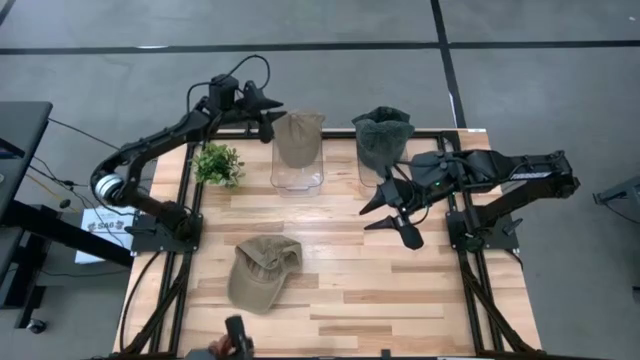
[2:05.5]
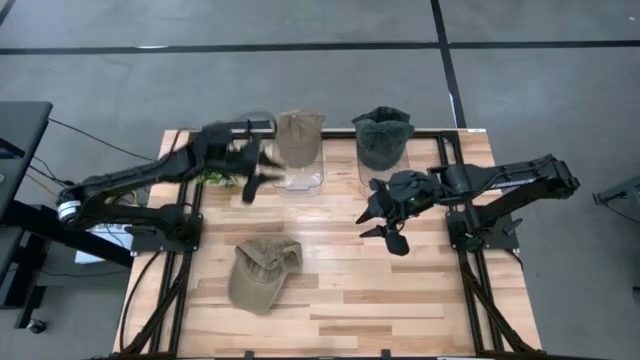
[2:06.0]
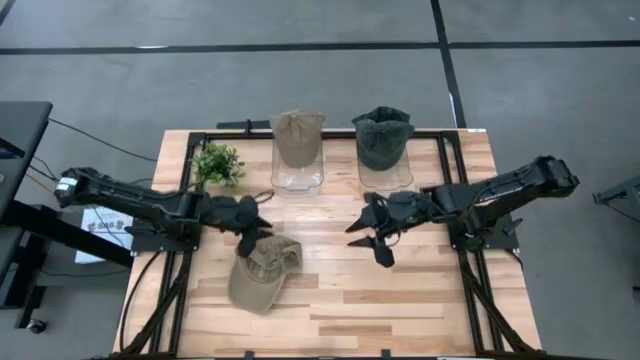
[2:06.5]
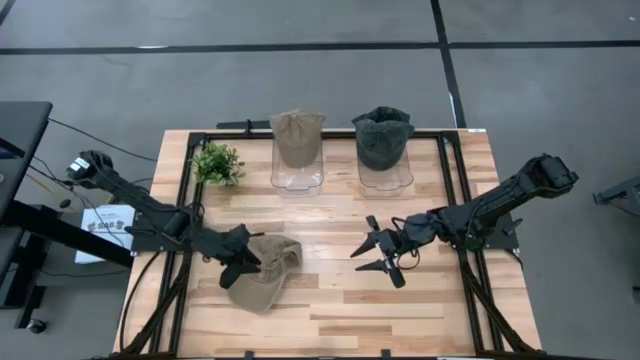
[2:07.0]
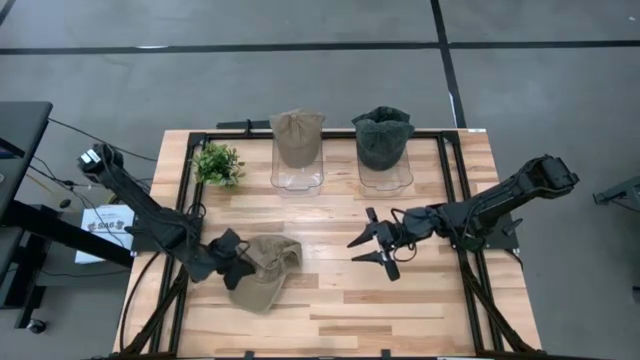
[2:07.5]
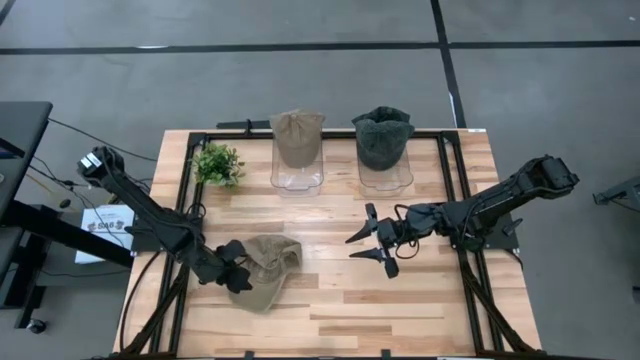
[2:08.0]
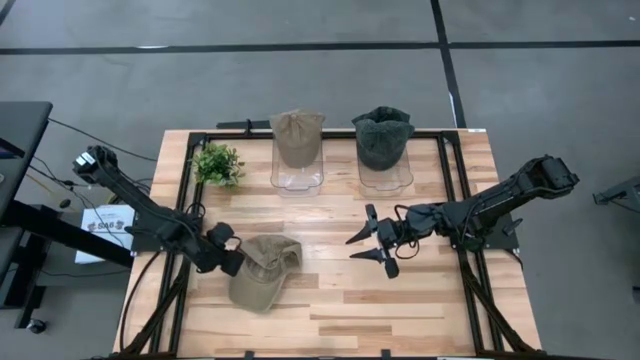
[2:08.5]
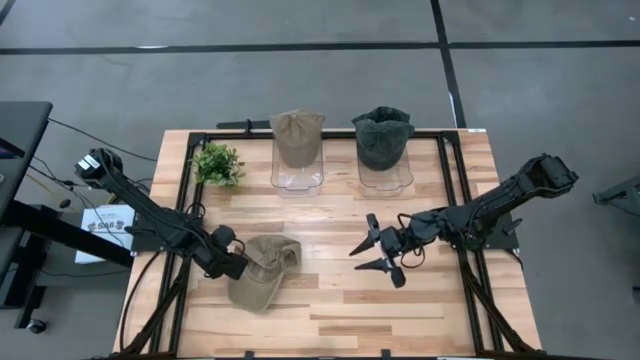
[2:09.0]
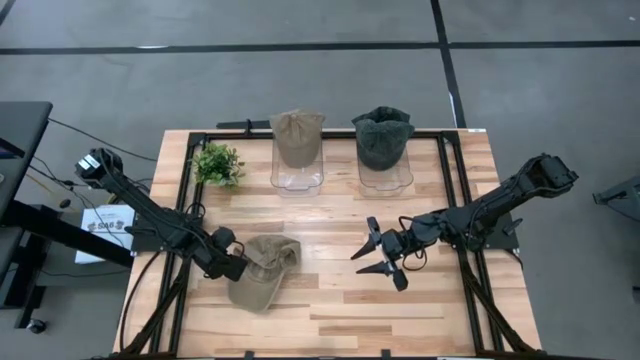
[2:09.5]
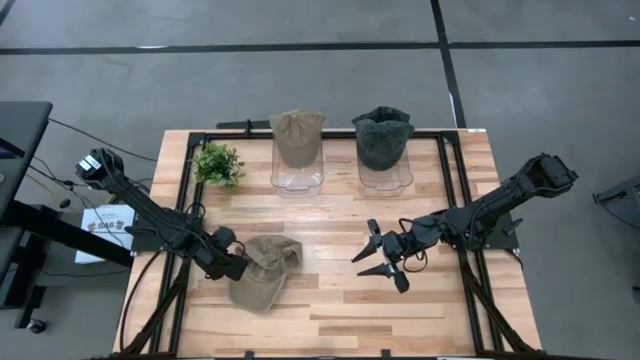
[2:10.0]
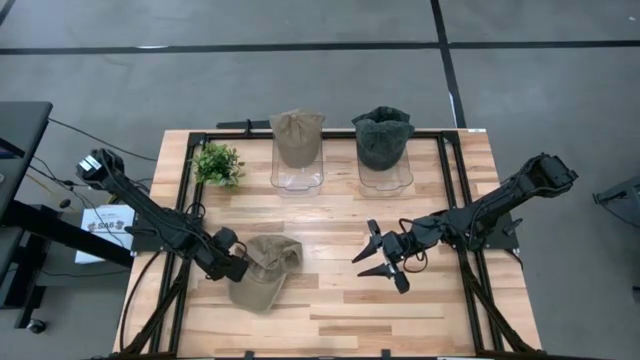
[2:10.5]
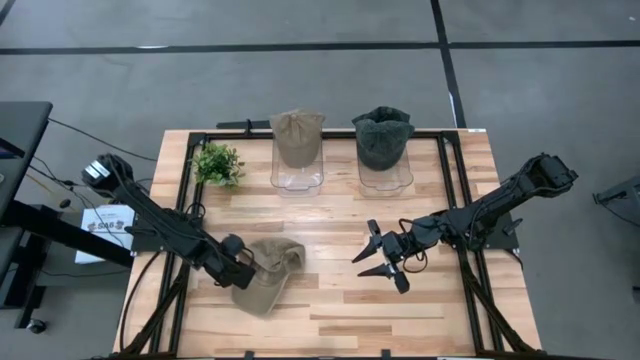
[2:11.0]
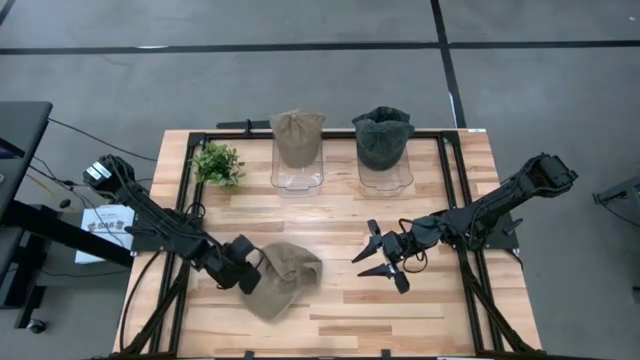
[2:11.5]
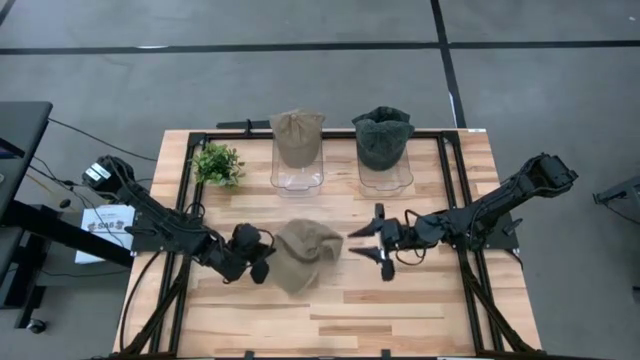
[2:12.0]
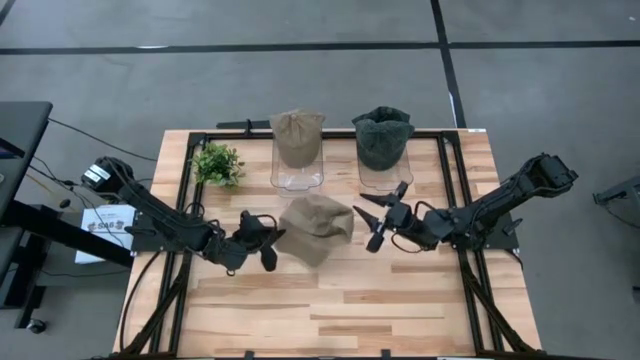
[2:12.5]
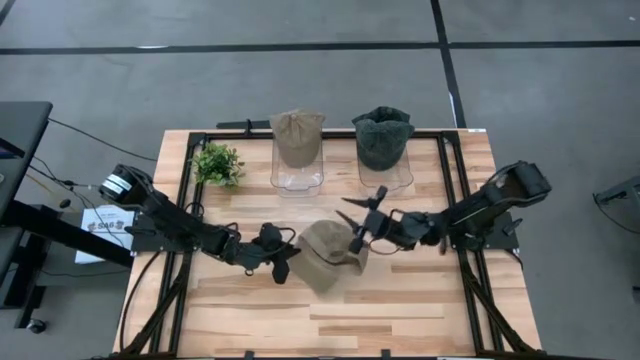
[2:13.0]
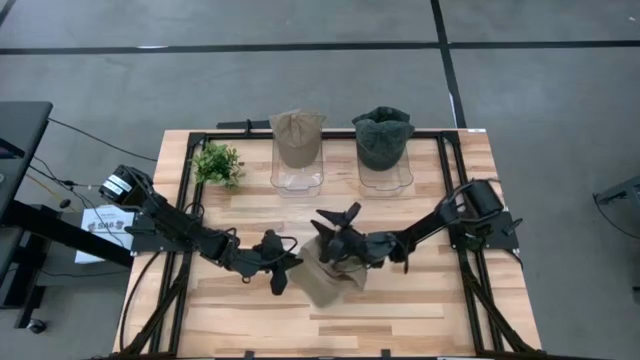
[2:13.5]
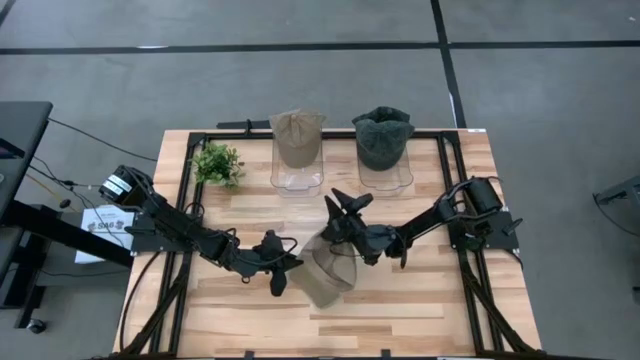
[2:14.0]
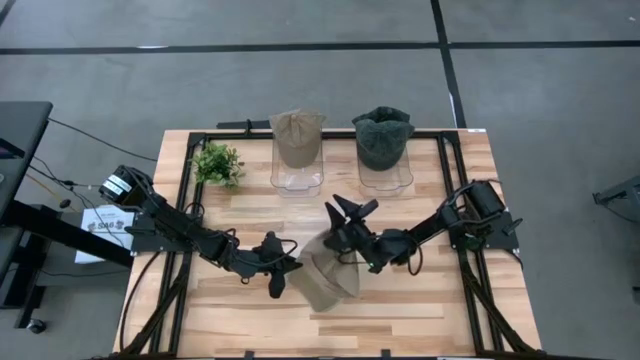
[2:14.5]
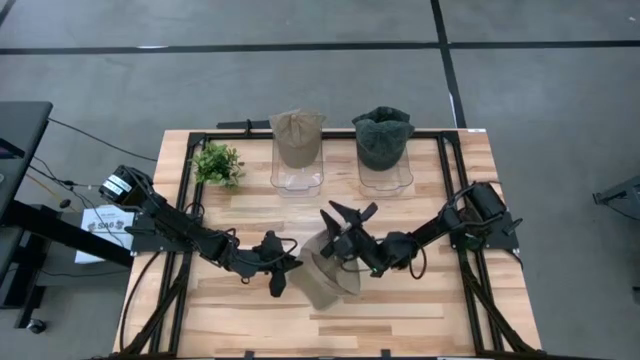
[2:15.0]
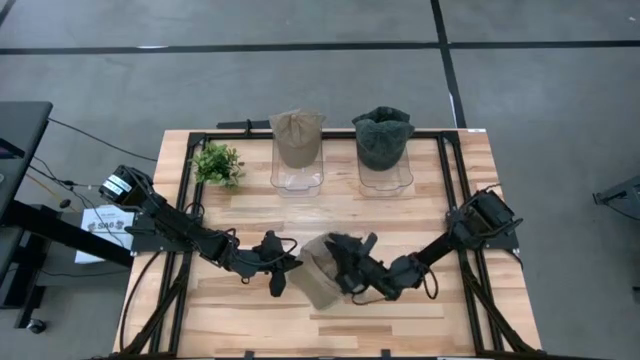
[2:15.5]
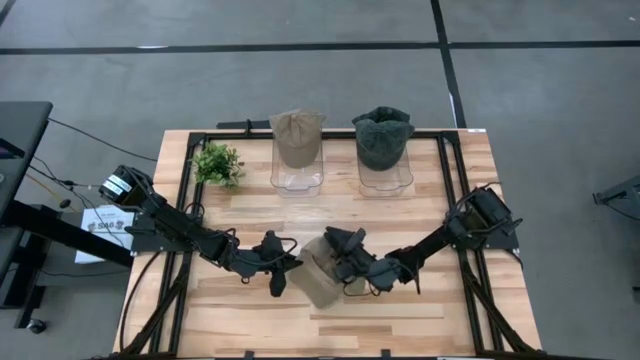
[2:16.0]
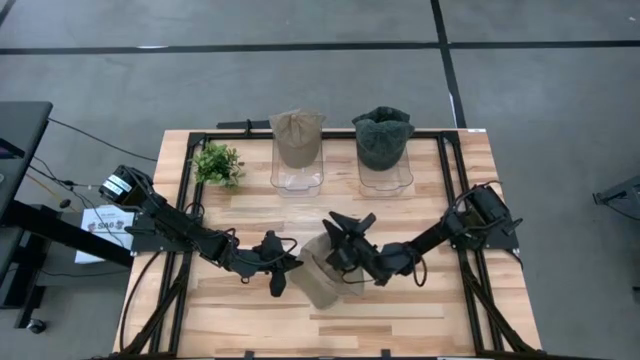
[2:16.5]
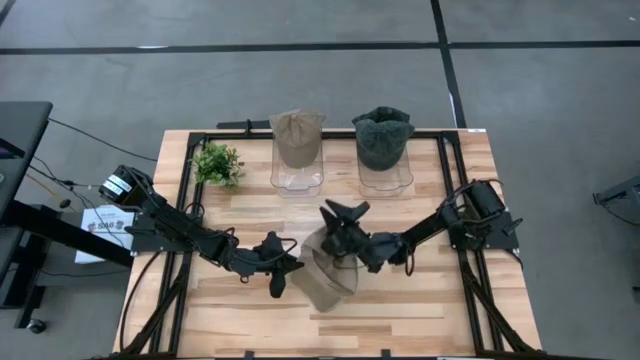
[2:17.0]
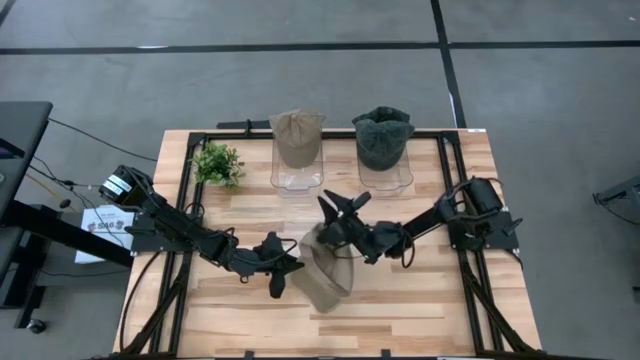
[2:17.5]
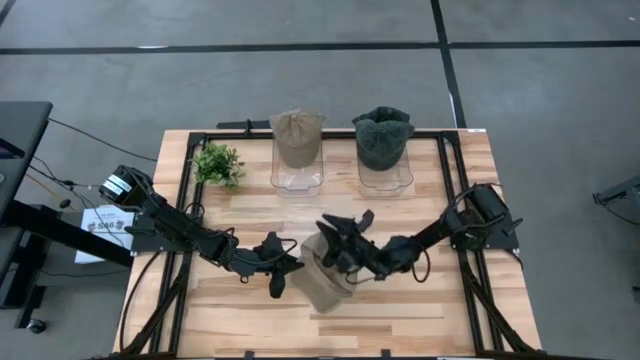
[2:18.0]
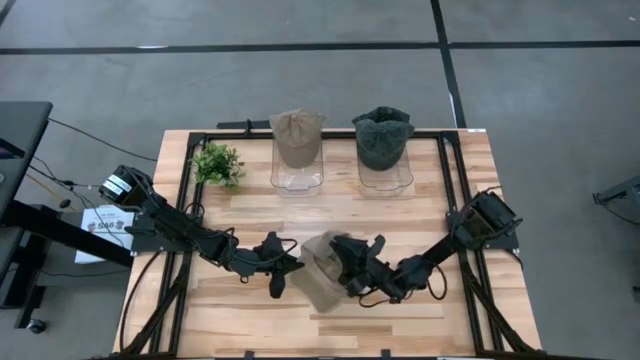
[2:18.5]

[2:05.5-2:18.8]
Task: Pick & Place hat
Put the brown cap into the left transparent bin

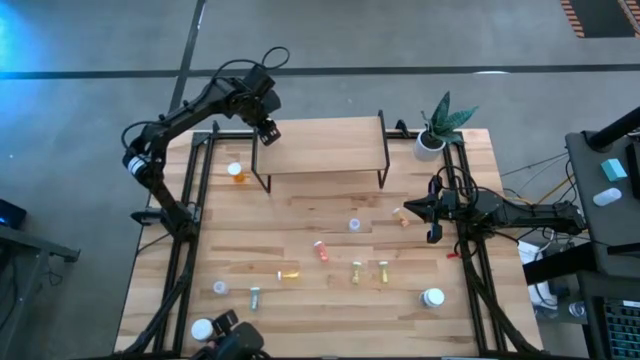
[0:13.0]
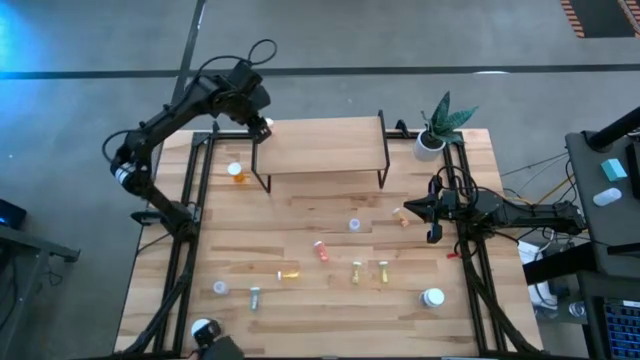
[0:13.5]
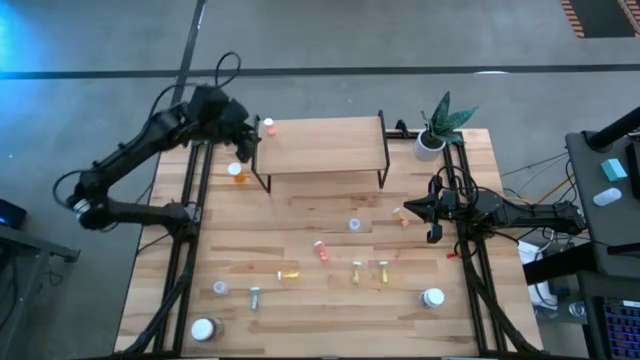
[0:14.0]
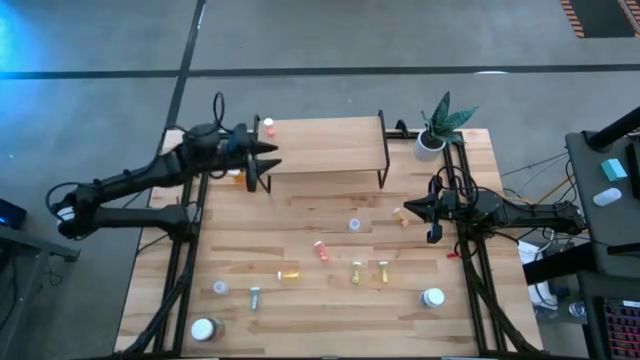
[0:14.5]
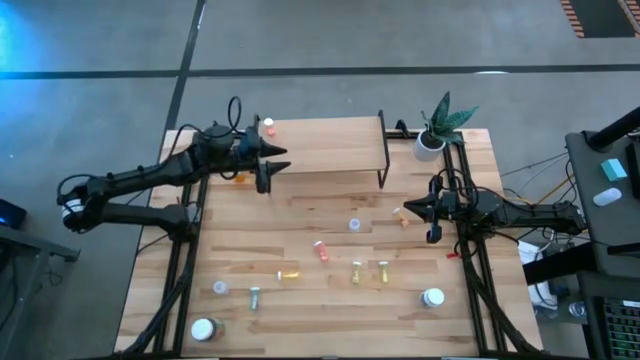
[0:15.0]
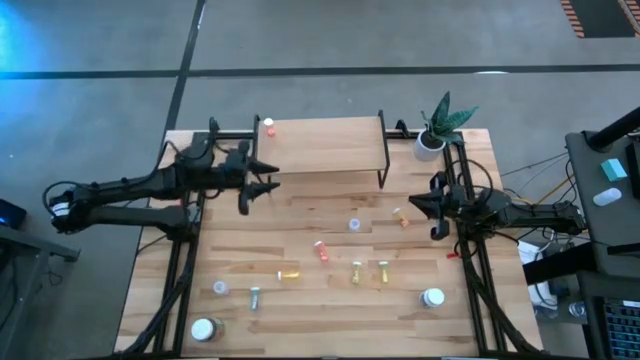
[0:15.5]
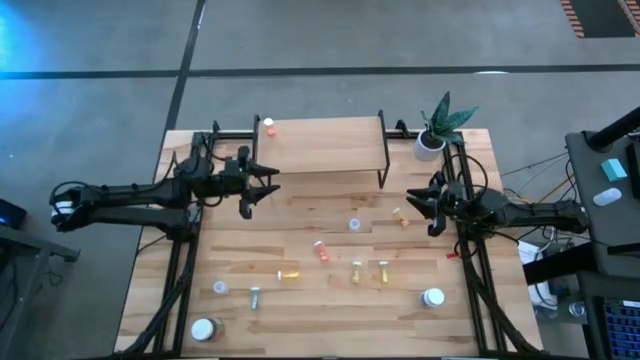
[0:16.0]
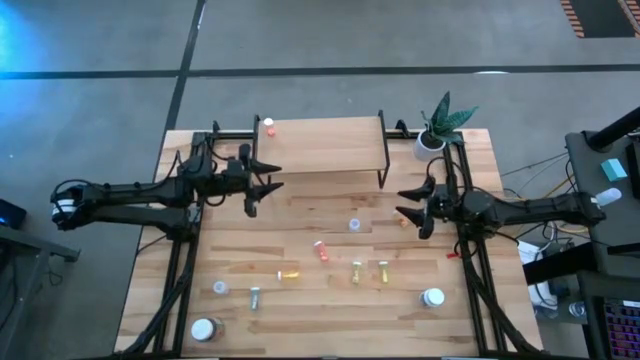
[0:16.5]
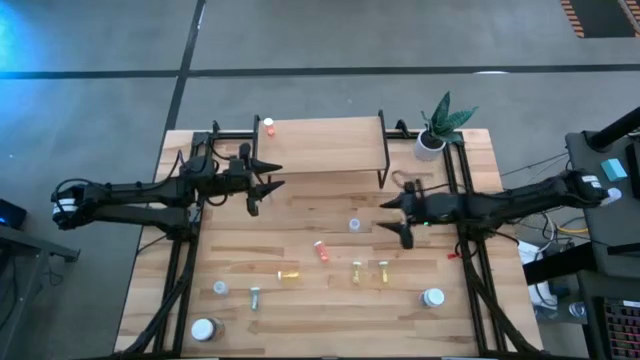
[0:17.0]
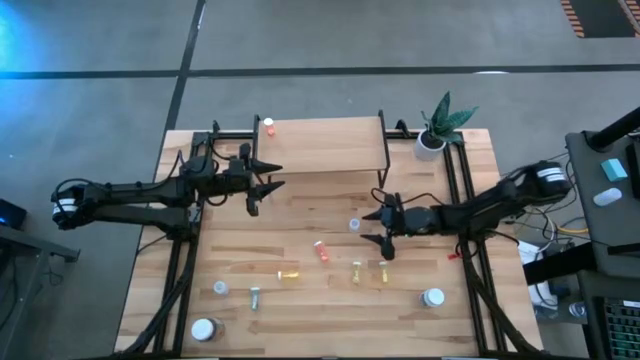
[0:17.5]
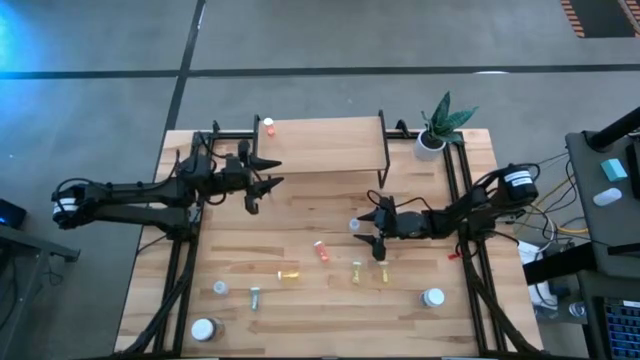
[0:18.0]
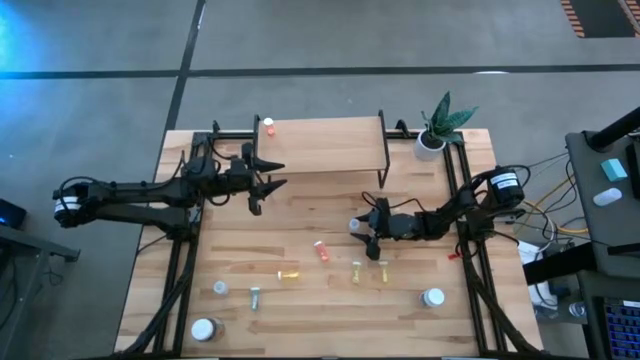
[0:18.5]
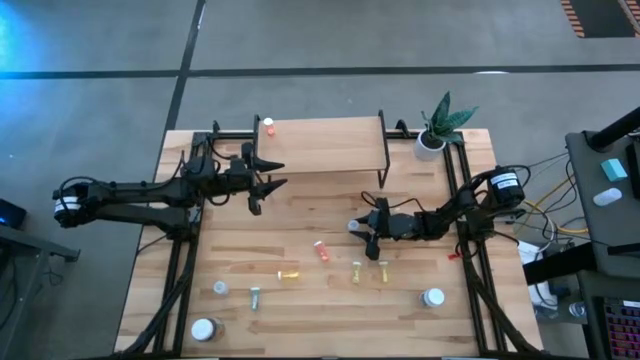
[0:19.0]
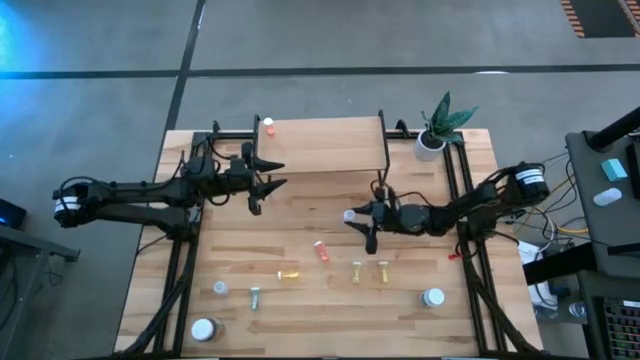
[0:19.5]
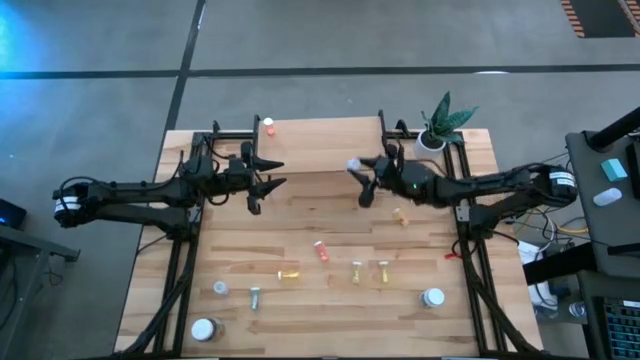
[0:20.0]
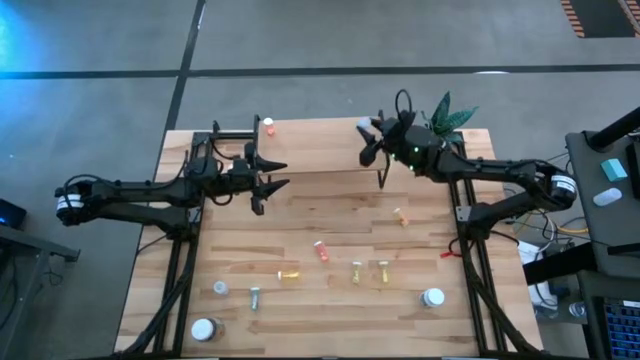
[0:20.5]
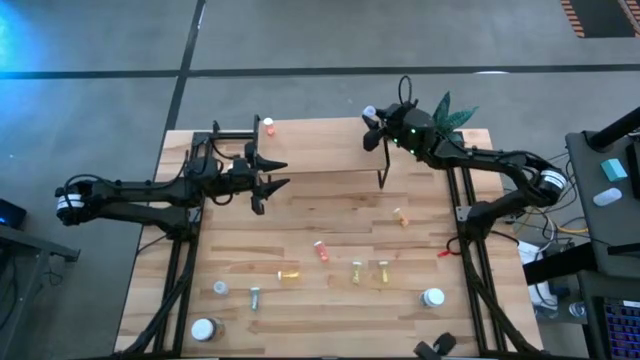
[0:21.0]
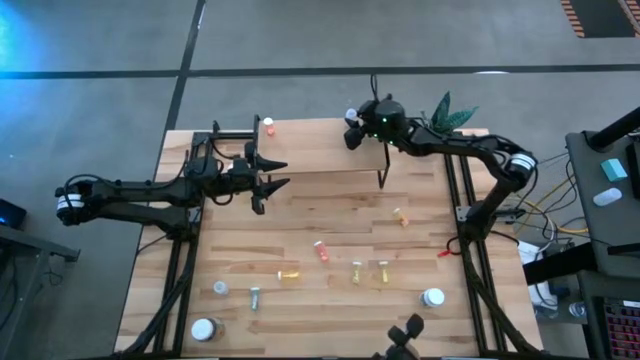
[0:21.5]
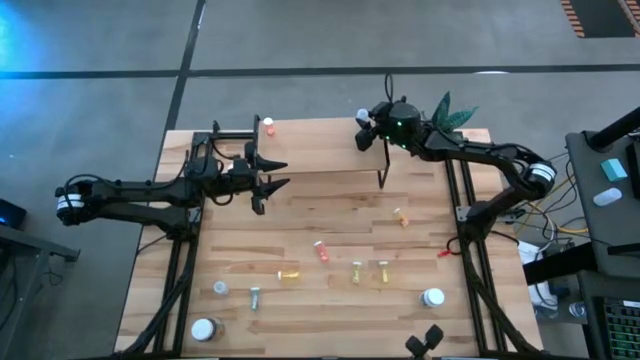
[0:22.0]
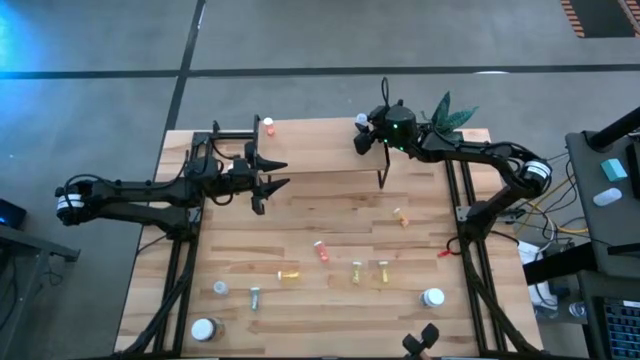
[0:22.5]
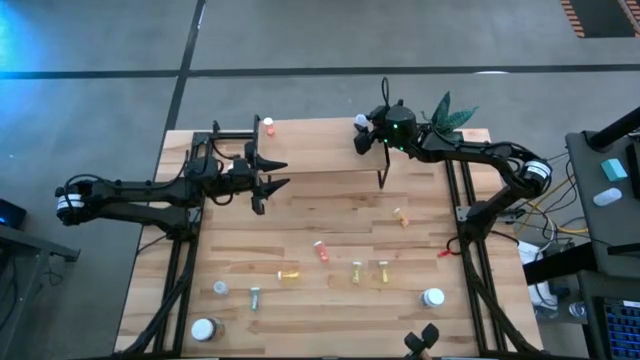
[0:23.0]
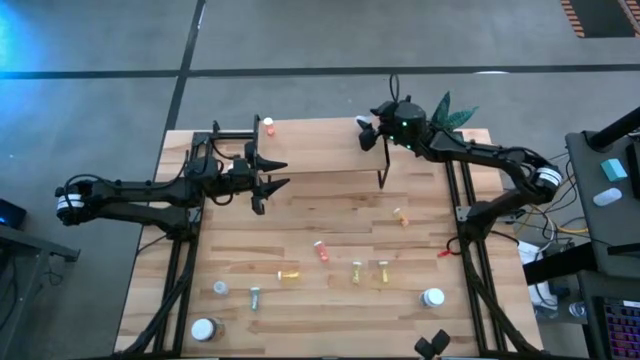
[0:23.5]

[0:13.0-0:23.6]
Task: Pick and place medicine bottles onto shelf by color
Put the right transparent pill bottle on the shelf
